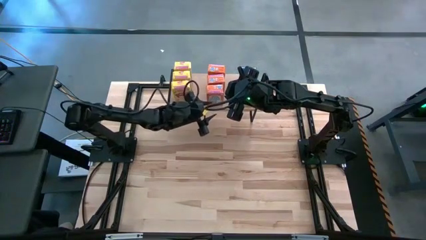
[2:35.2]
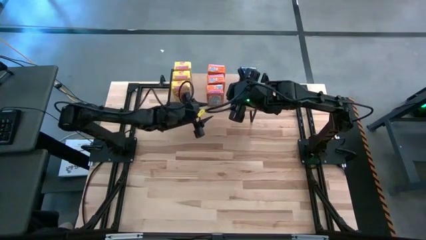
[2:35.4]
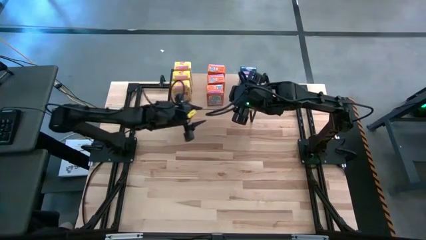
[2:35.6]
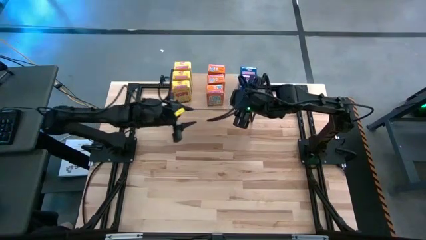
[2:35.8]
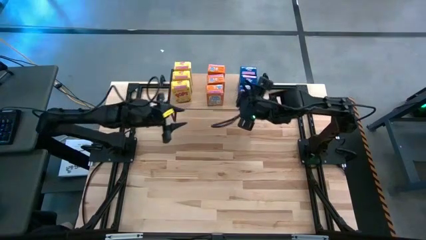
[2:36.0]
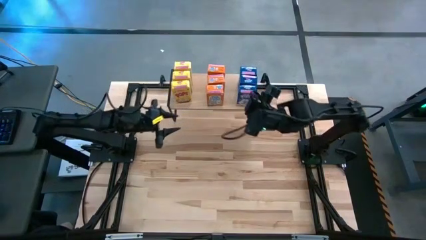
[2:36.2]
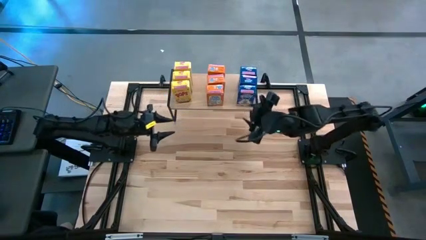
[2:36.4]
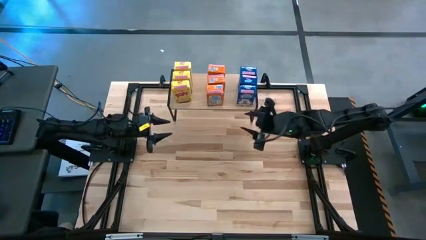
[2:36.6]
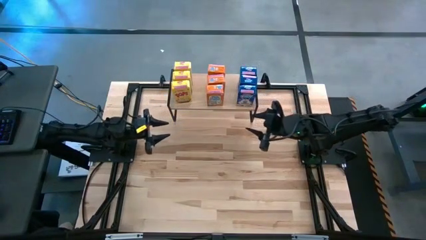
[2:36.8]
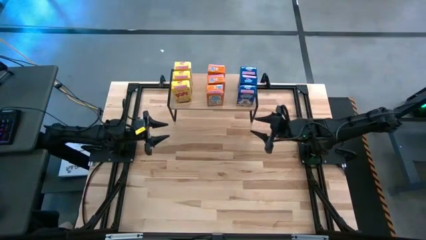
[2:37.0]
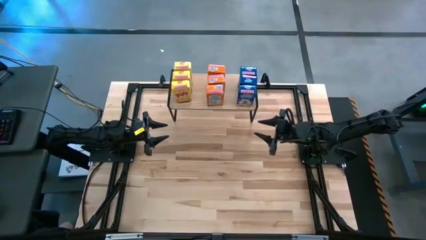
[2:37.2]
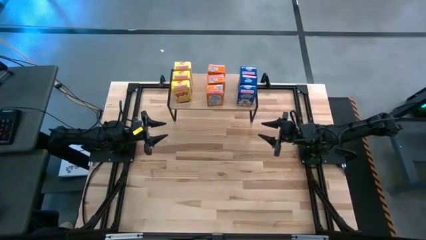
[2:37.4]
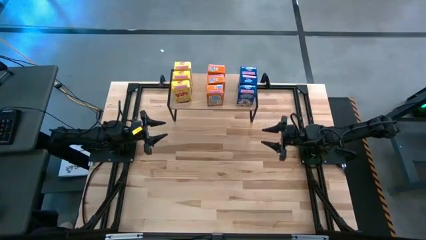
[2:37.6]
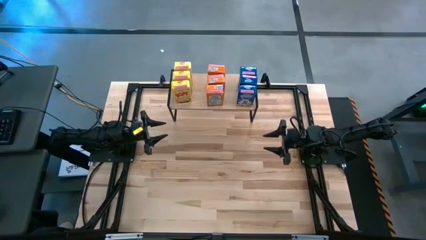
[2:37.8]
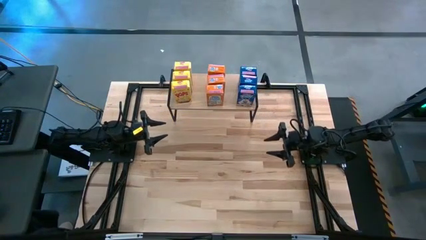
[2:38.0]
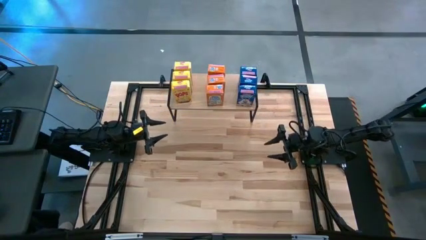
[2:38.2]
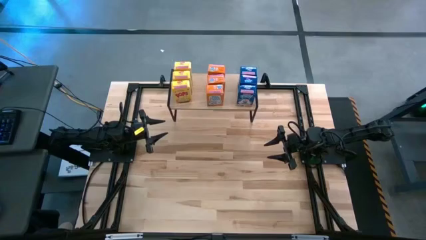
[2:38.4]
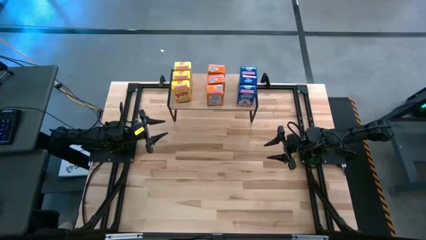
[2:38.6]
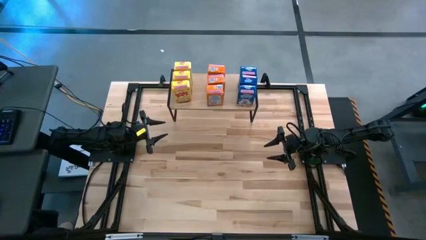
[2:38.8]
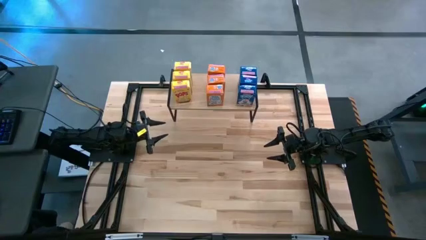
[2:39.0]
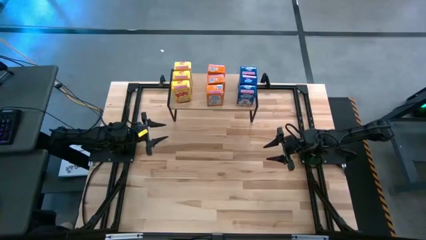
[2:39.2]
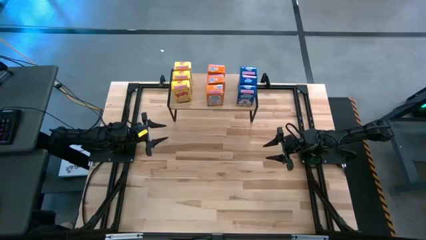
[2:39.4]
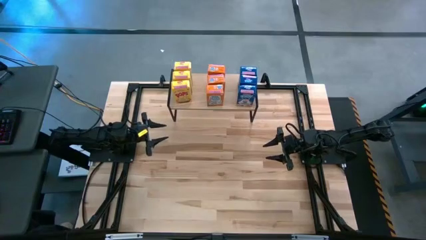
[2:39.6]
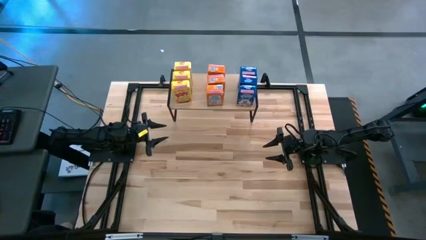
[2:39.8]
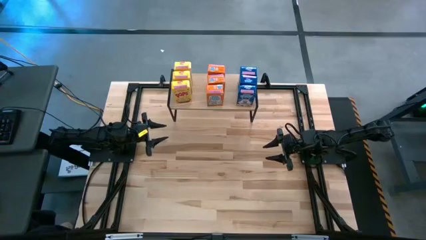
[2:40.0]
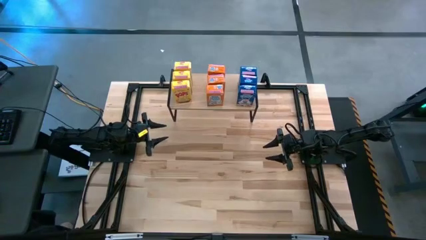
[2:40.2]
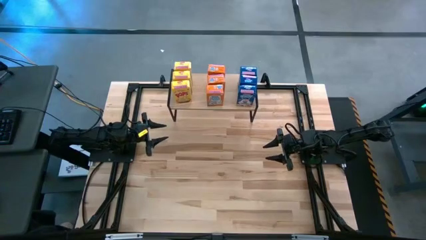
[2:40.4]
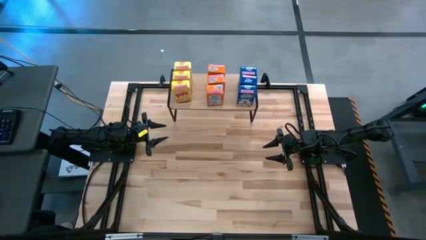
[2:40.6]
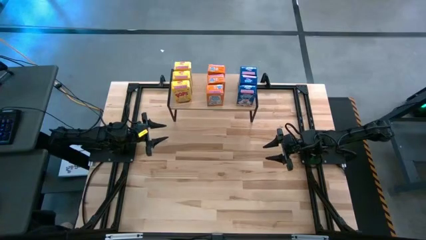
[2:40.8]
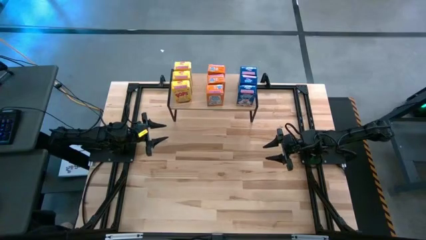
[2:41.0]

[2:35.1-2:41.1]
Task: Stack cereal on shelf
Return to Home Position

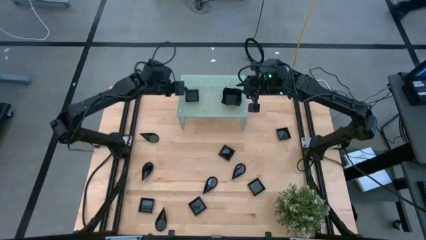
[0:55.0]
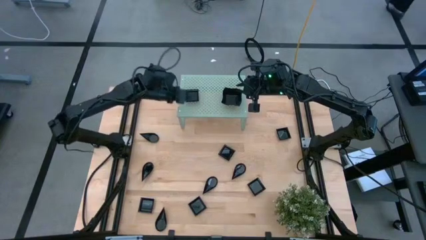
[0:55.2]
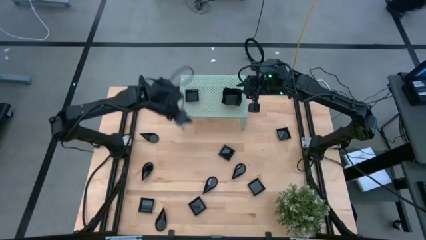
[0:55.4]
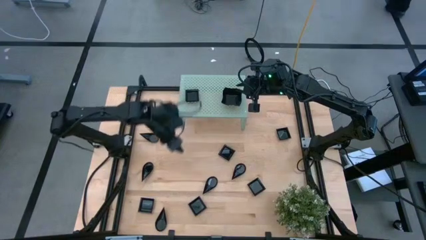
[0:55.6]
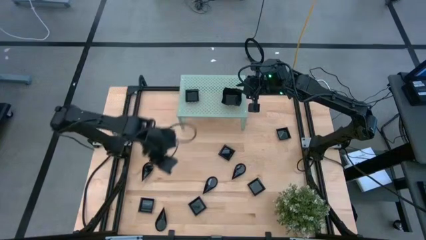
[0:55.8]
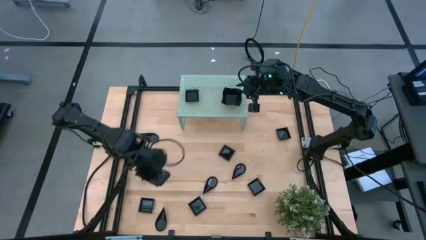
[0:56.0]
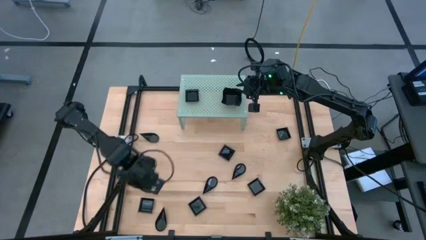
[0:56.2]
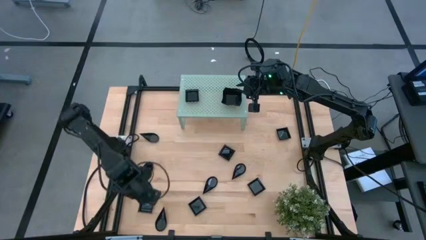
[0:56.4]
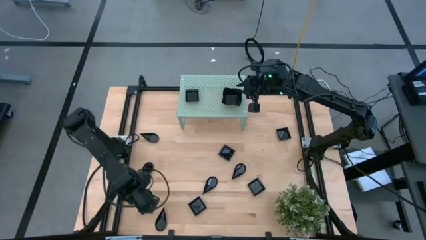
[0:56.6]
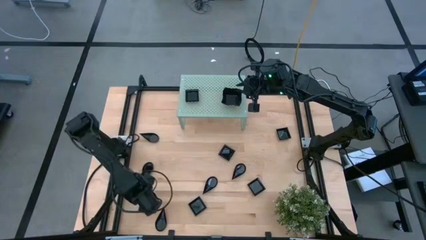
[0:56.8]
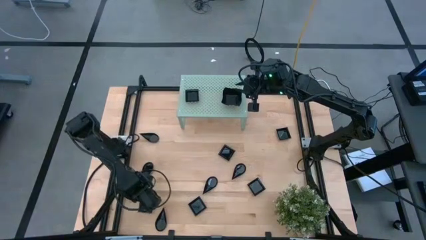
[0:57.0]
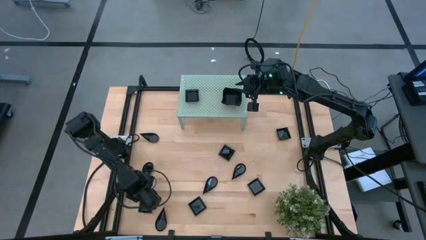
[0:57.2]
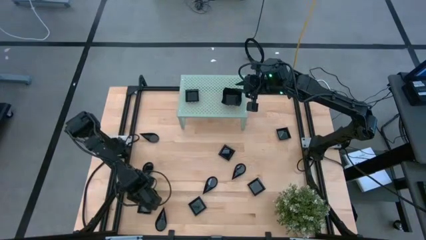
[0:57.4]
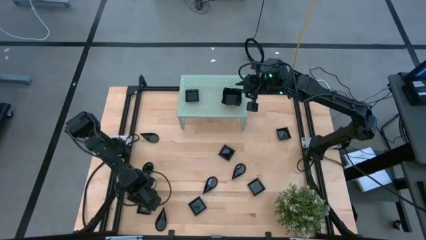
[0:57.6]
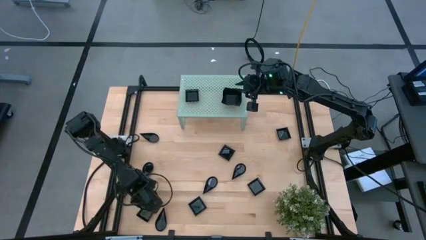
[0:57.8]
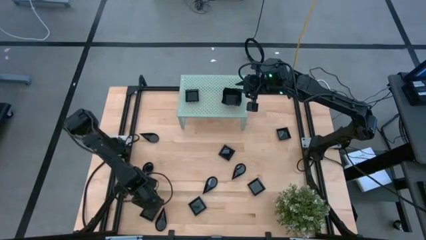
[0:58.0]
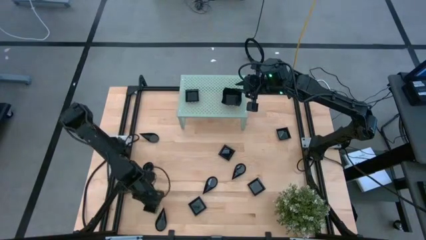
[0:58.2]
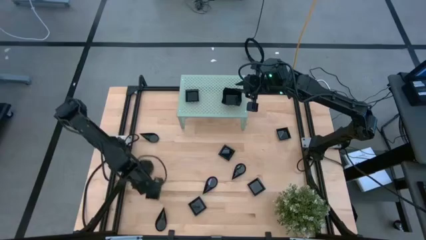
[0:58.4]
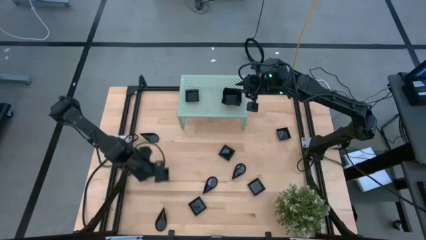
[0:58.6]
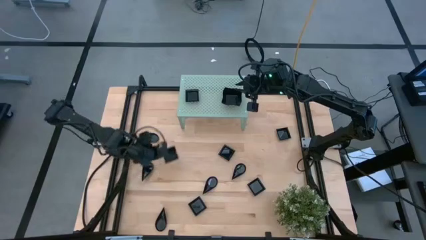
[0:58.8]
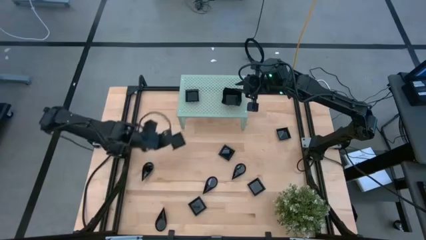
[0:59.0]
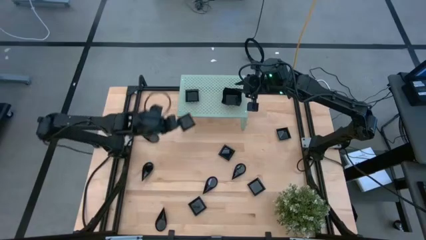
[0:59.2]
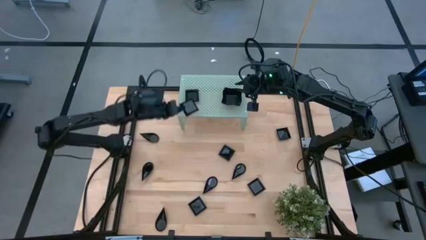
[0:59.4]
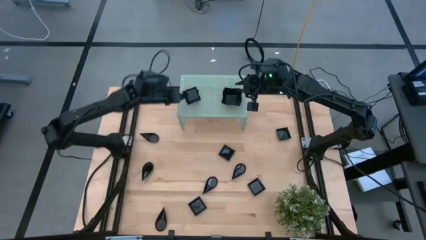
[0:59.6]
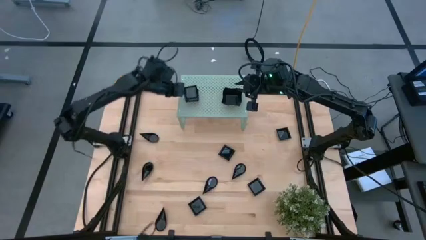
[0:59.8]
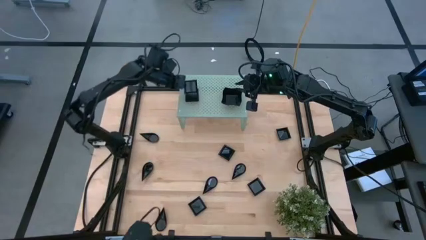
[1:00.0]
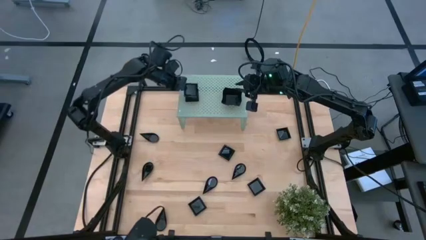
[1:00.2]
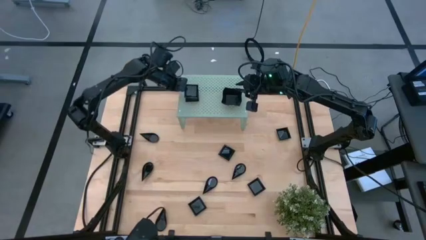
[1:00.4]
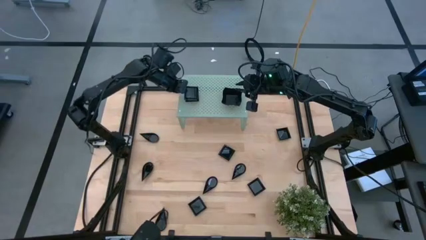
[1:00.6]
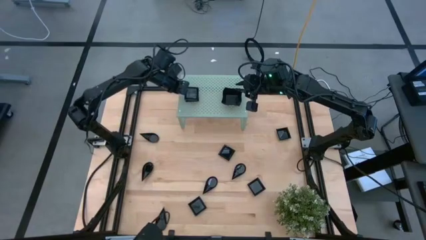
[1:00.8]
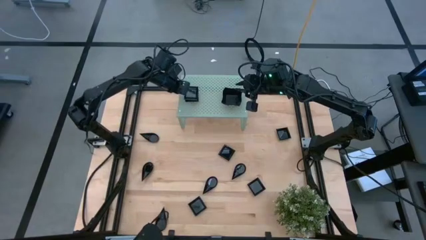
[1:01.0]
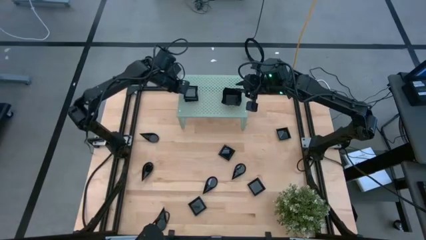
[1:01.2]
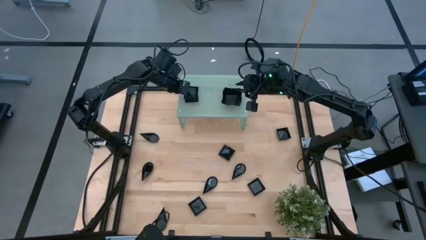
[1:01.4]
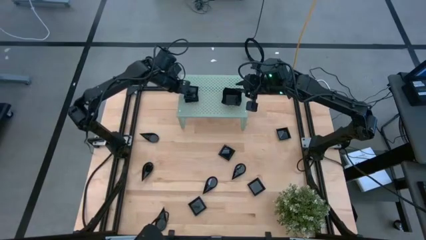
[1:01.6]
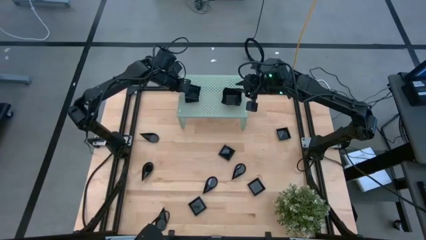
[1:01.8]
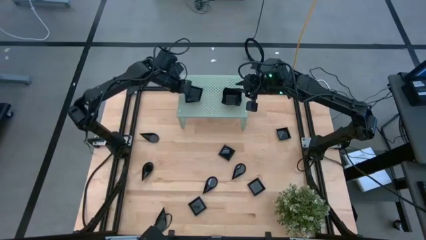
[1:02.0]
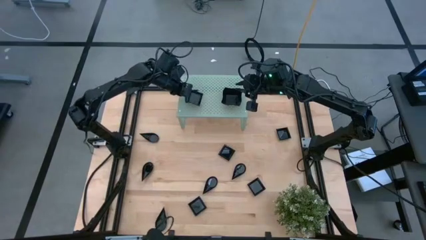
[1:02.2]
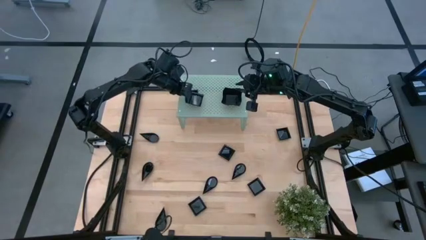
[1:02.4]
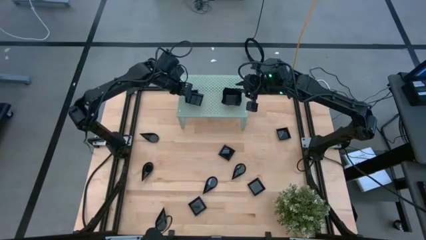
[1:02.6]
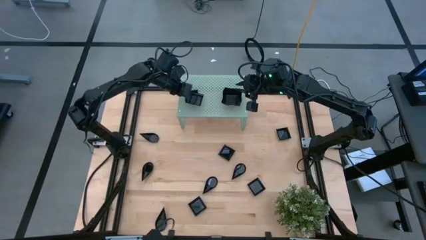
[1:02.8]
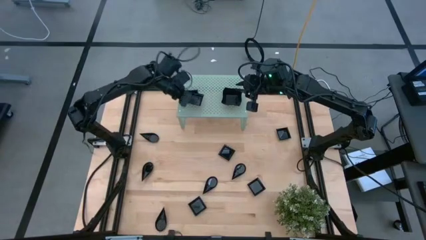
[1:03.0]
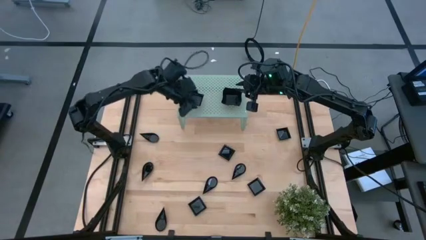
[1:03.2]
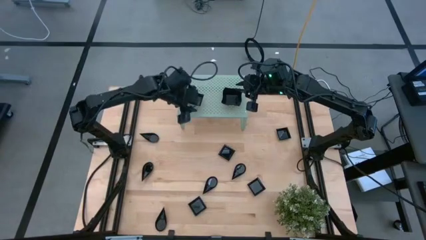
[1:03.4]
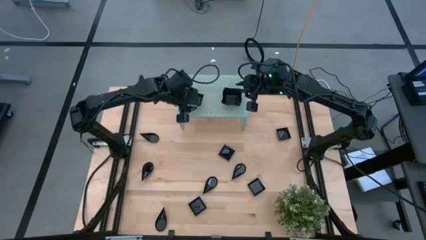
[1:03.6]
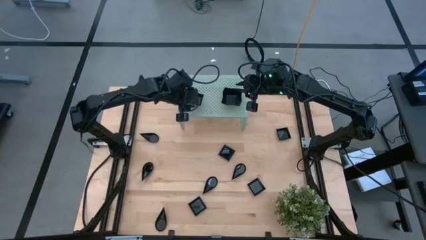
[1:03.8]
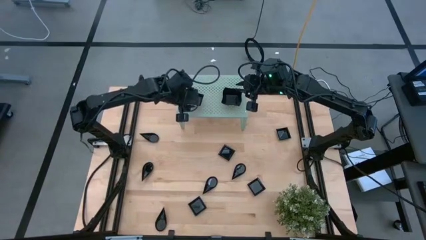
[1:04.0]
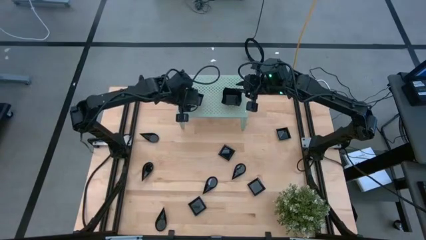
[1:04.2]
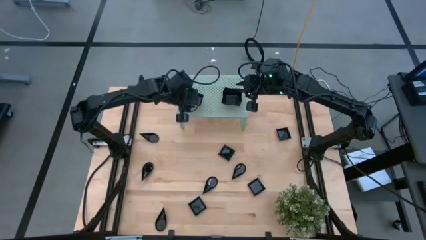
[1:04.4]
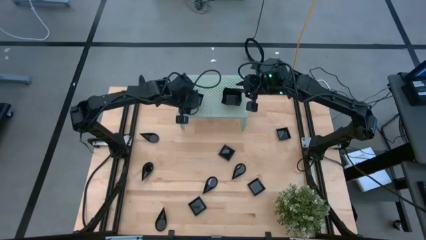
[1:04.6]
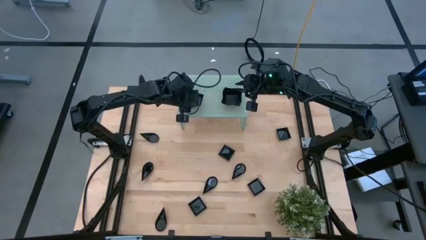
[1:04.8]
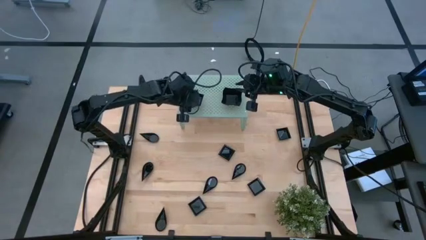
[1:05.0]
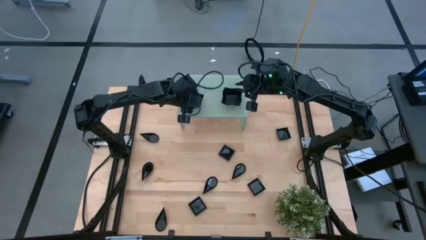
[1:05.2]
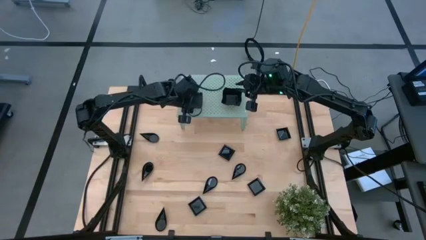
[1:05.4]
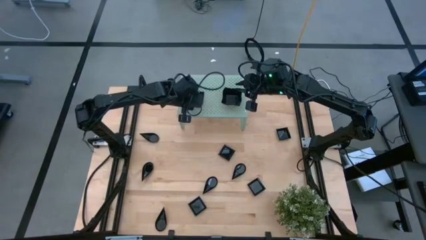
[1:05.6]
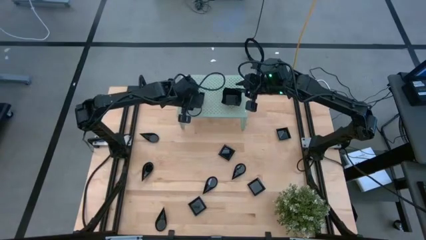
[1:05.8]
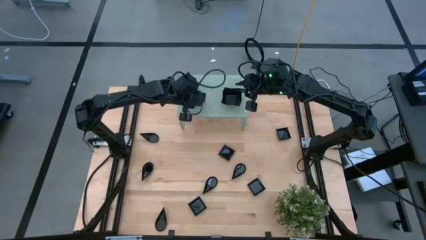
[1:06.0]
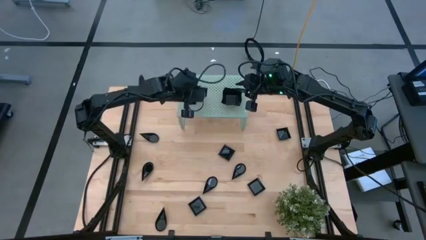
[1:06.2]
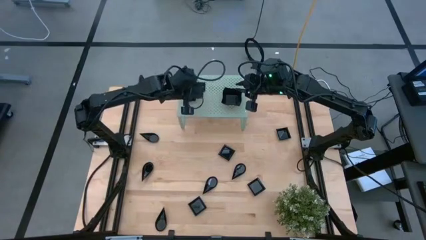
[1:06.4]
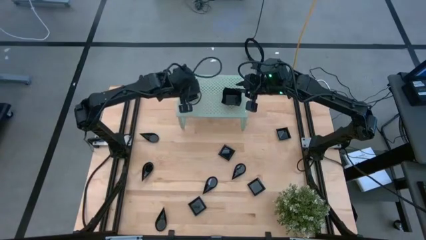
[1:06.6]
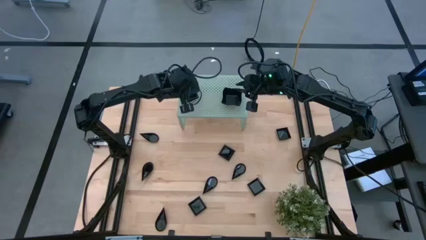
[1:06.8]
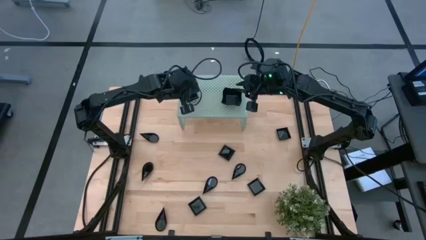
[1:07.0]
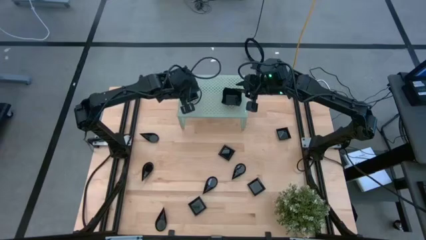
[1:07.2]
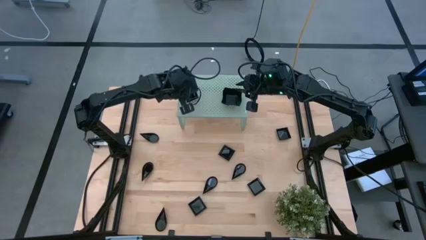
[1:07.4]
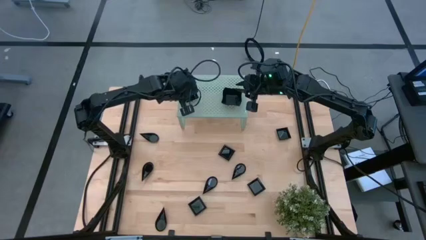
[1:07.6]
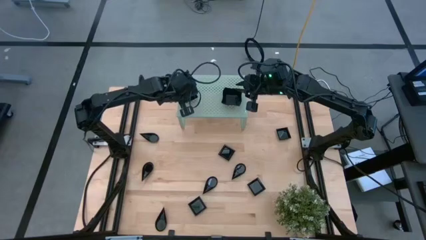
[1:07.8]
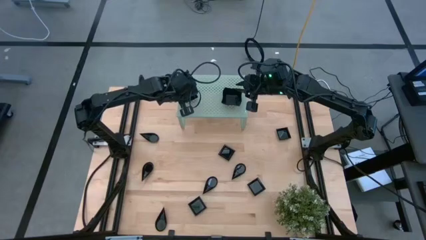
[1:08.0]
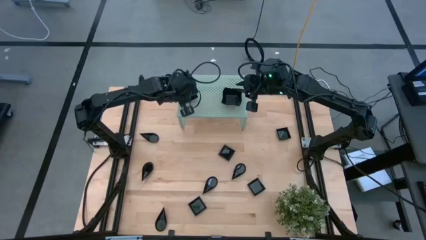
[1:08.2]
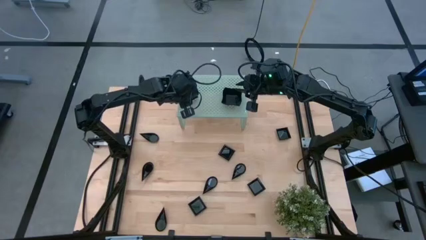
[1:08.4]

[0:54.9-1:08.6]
Task: Pick & Place Mini shaped plates
Stack the black square plate on top of the other black square plate on the shelf
